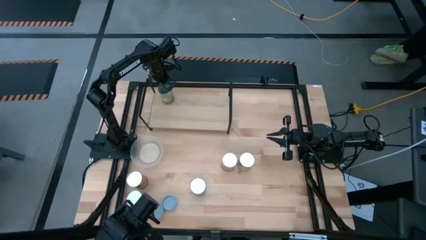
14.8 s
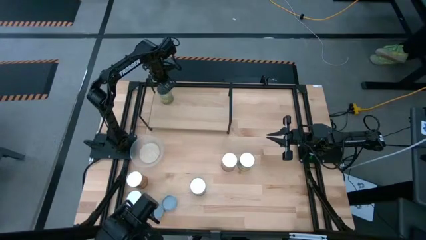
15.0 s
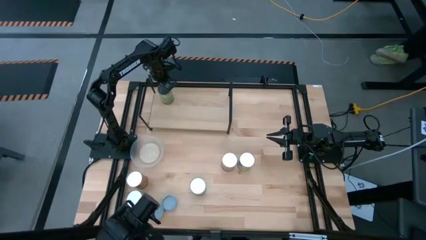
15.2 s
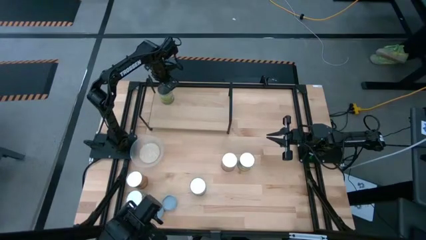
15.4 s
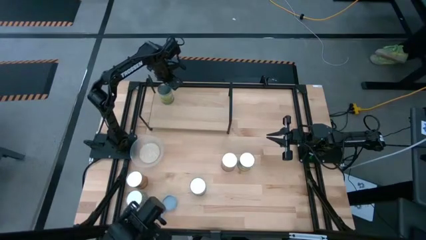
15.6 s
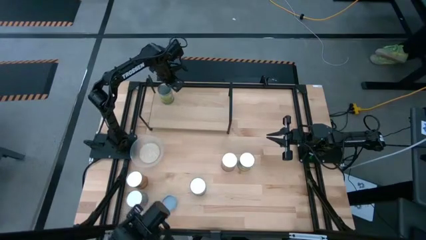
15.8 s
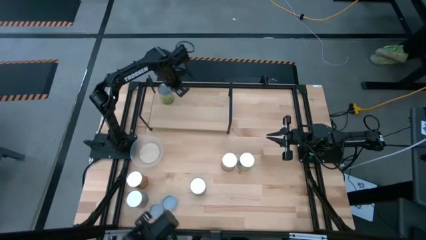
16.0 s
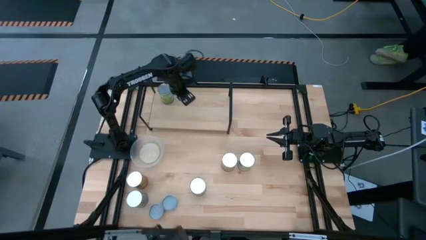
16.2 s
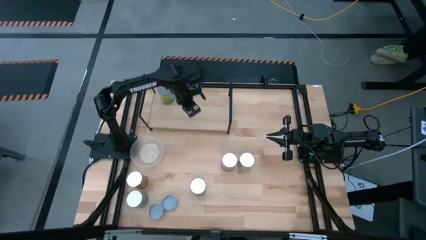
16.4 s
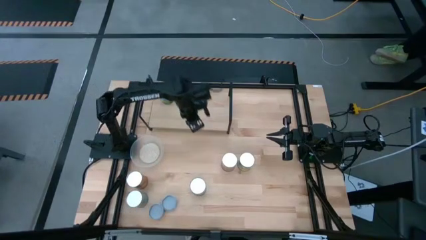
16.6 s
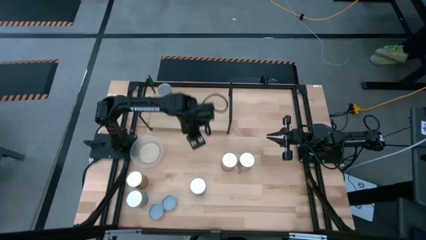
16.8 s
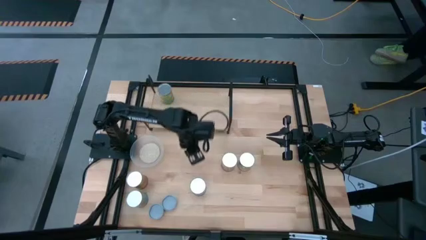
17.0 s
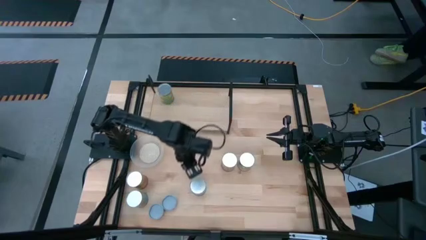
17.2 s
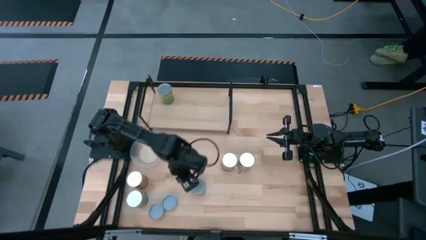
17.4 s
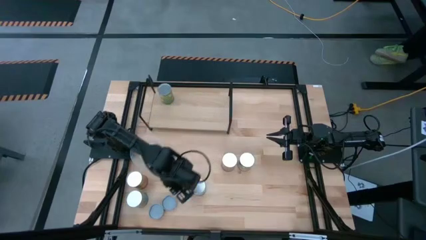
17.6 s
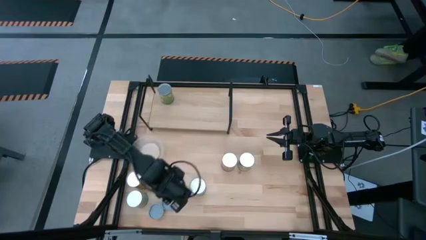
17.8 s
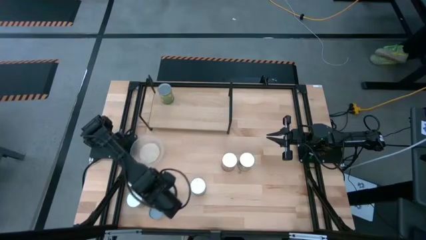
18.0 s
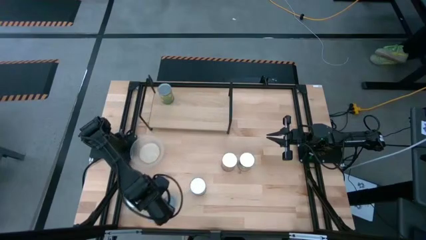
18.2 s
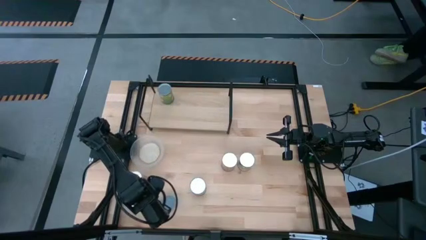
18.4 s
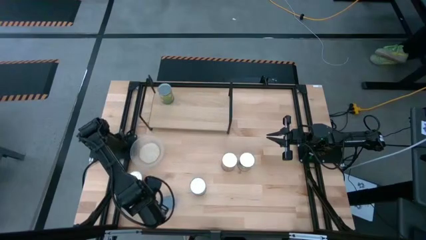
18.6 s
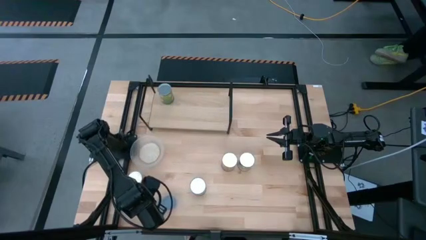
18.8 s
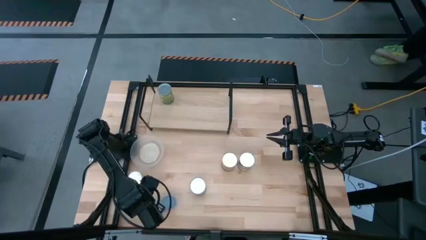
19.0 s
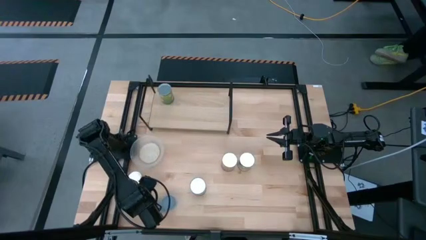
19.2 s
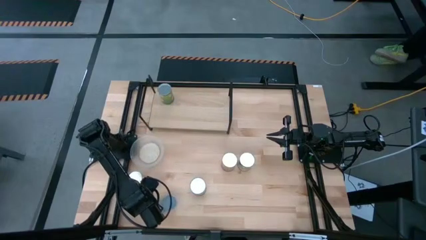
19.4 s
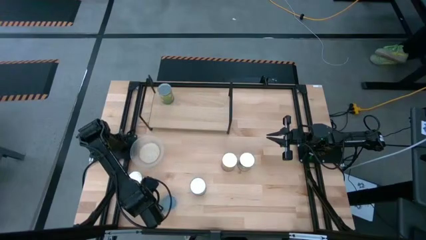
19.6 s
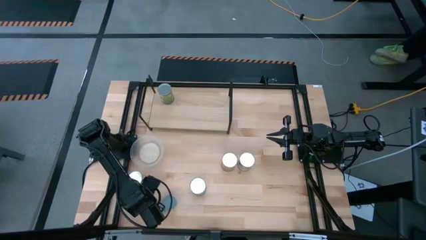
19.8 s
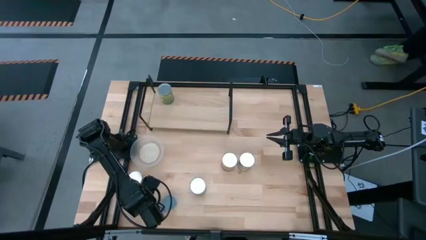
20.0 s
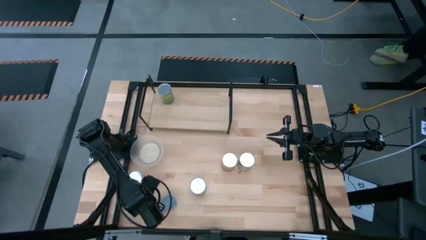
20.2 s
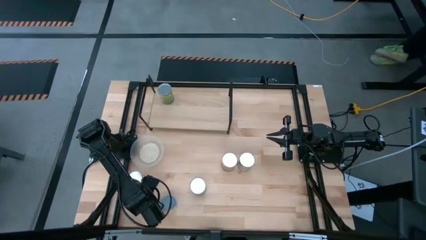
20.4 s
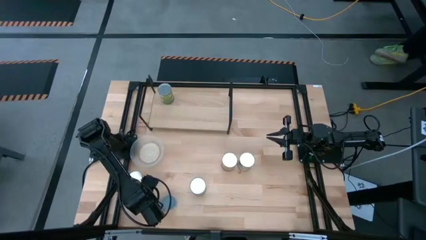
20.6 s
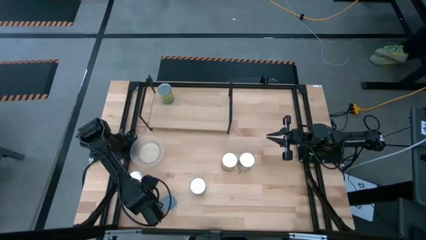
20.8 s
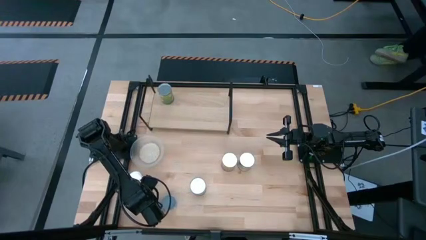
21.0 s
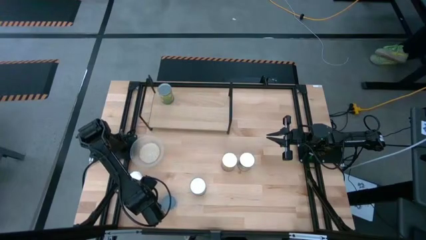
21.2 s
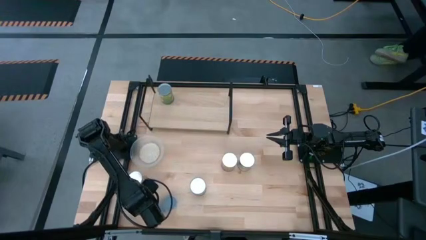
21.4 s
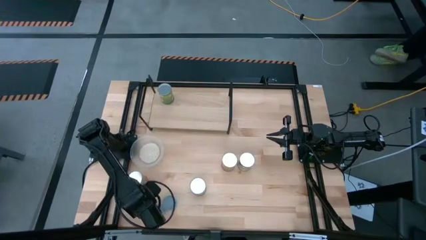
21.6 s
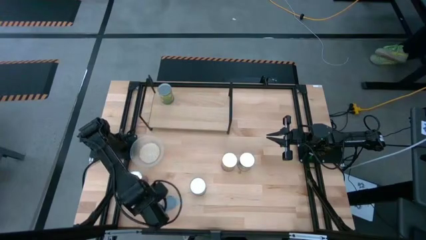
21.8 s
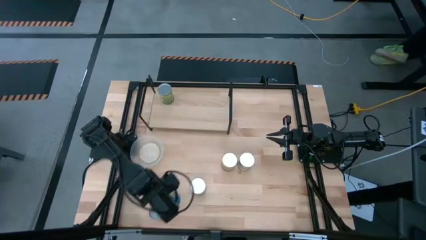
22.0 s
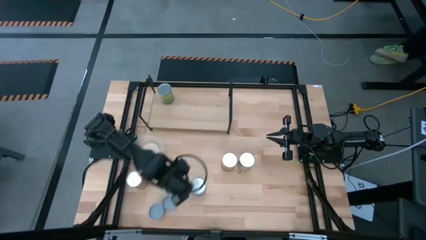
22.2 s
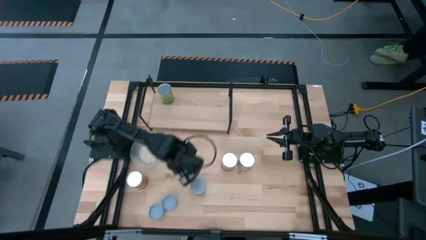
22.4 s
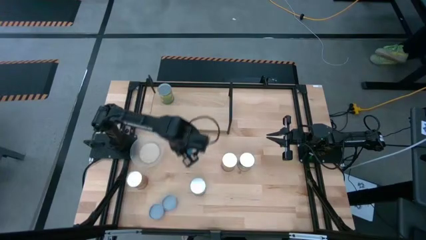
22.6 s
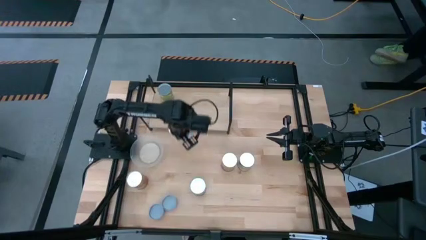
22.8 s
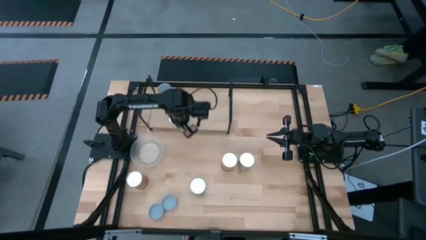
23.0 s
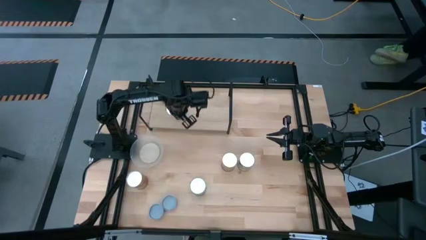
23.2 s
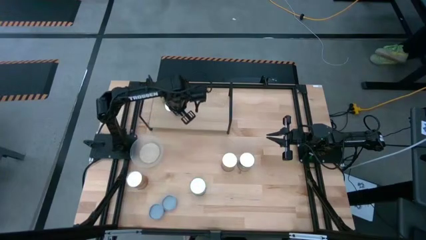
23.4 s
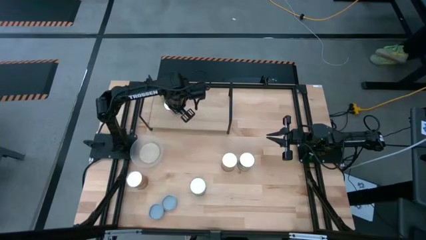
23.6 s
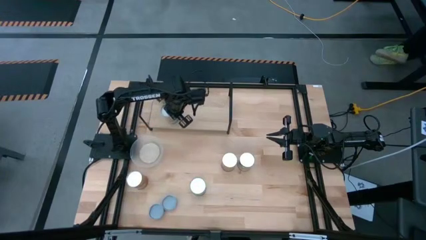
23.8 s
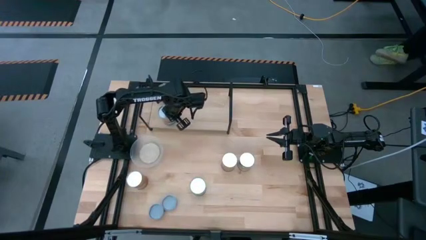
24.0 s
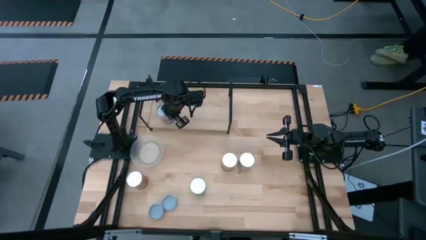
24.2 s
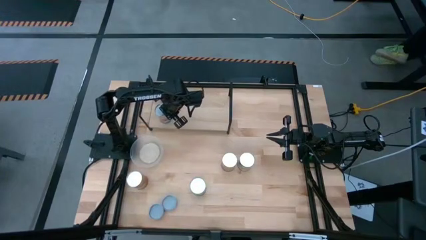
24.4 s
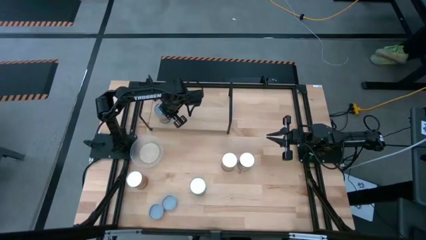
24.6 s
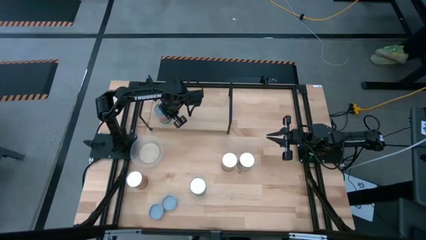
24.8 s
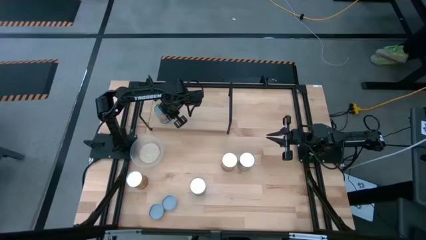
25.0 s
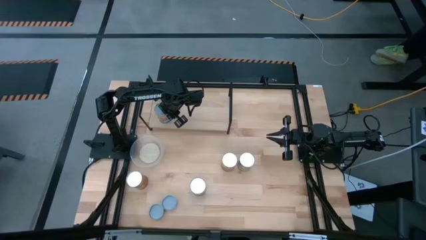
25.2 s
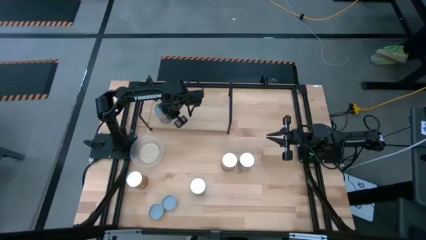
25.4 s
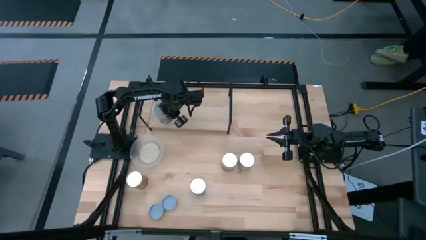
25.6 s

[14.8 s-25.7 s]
Task: Pick and place cans onto a shelf
Put the tomato can on the shelf
